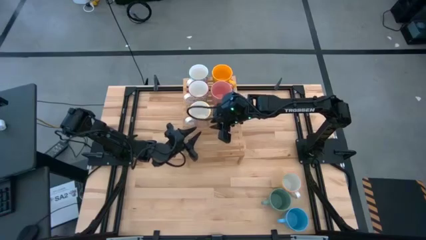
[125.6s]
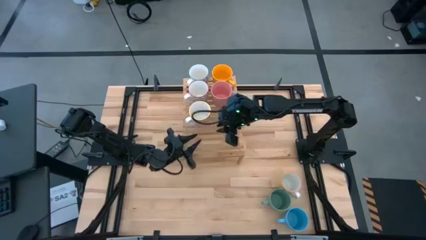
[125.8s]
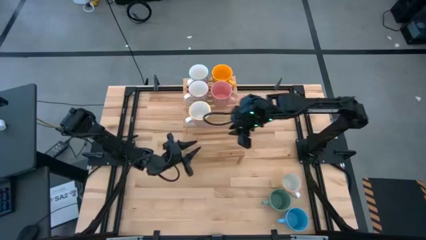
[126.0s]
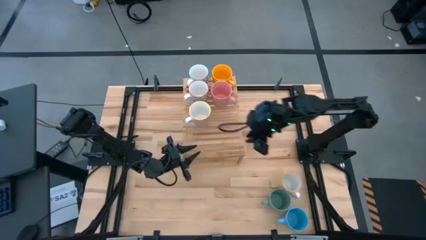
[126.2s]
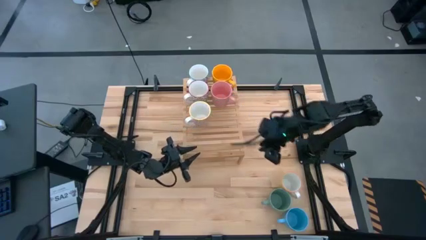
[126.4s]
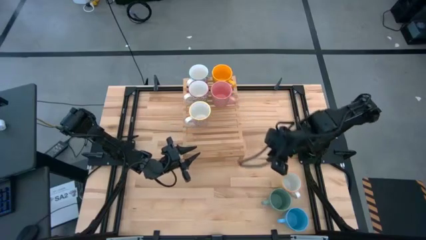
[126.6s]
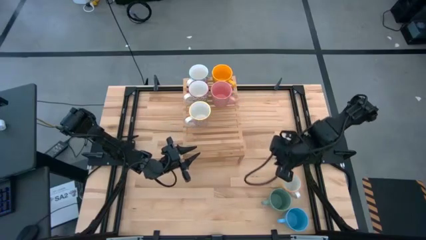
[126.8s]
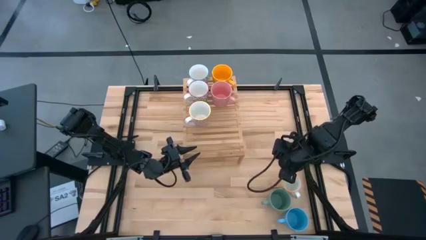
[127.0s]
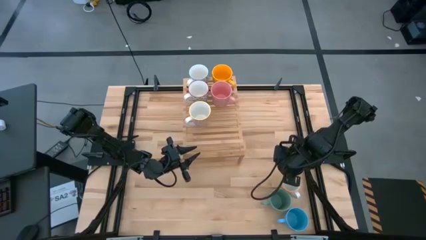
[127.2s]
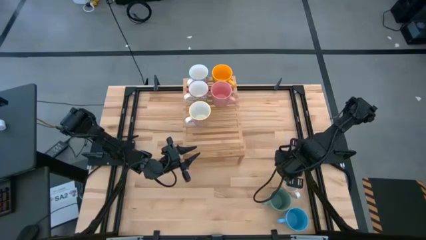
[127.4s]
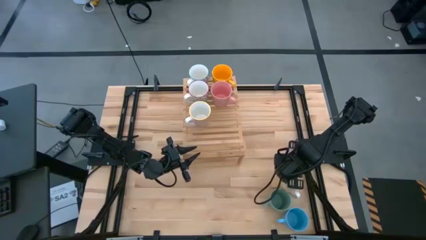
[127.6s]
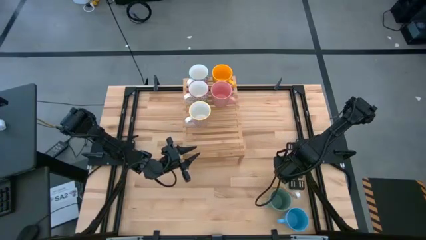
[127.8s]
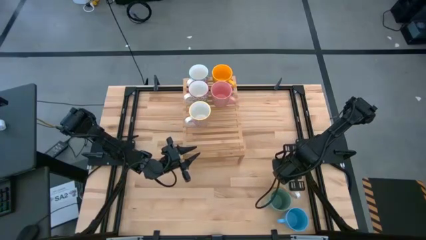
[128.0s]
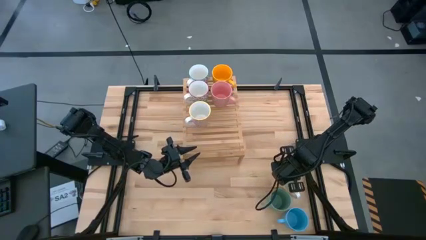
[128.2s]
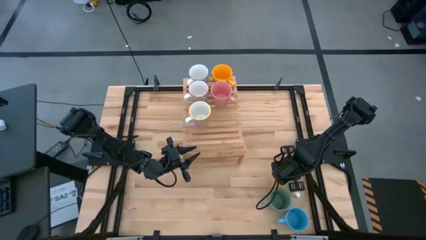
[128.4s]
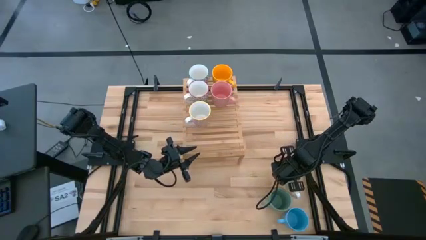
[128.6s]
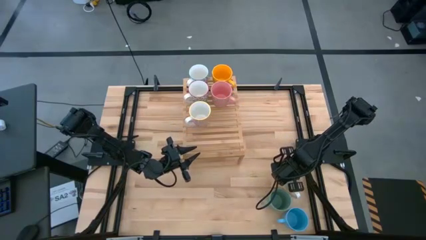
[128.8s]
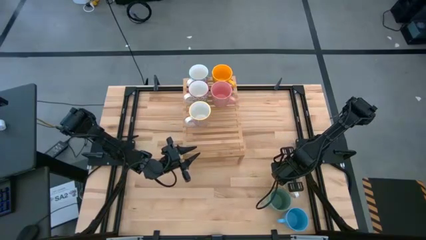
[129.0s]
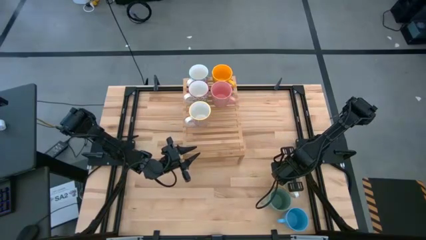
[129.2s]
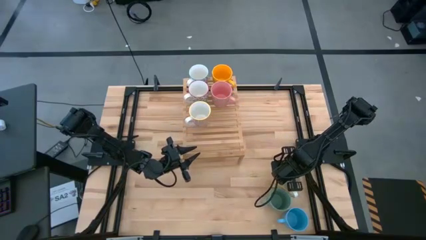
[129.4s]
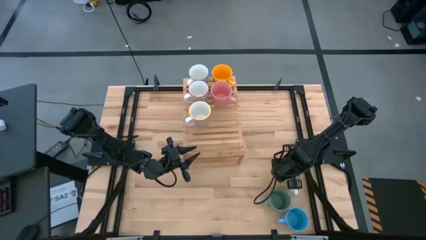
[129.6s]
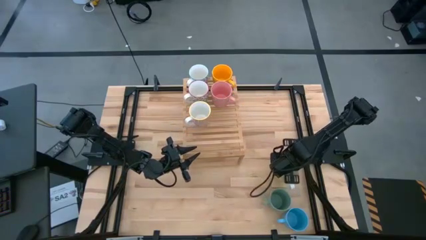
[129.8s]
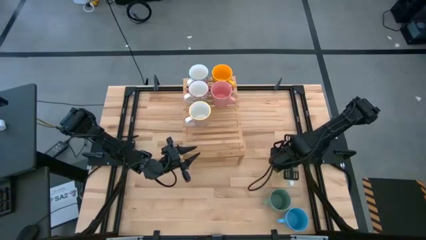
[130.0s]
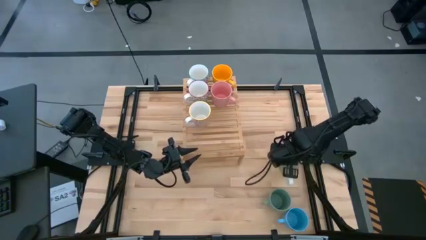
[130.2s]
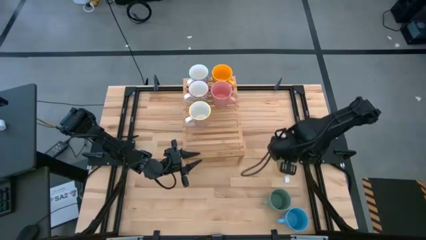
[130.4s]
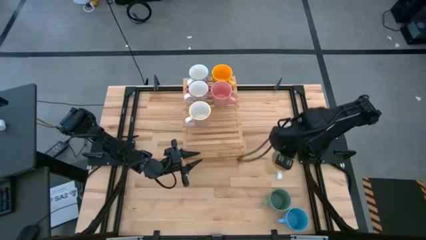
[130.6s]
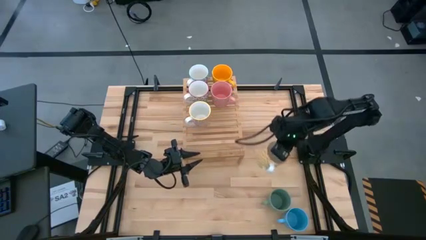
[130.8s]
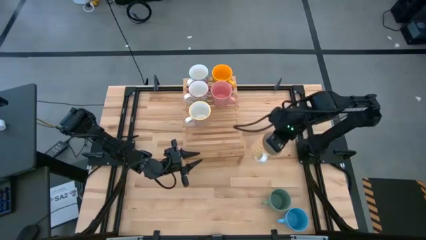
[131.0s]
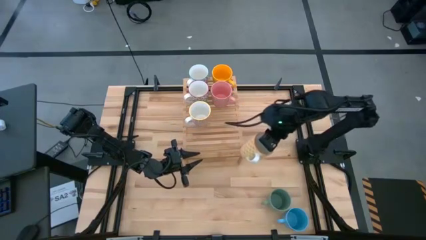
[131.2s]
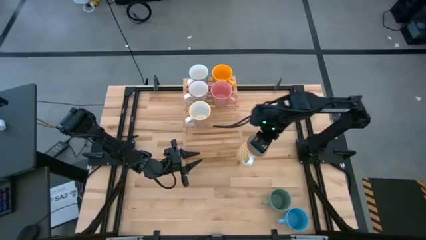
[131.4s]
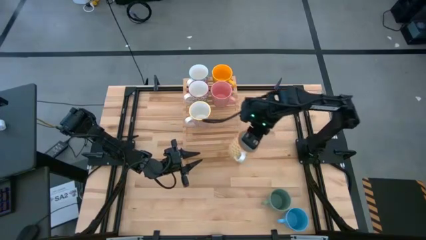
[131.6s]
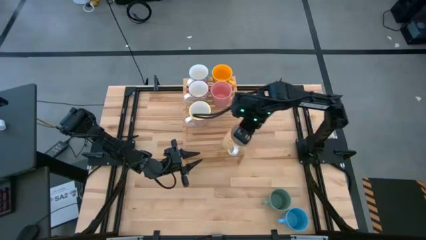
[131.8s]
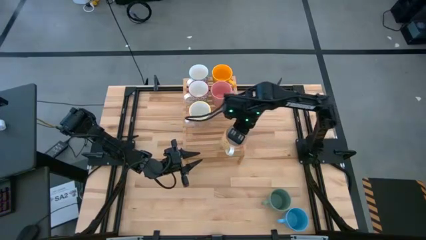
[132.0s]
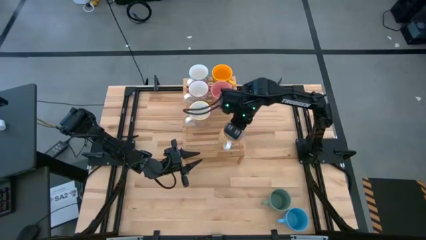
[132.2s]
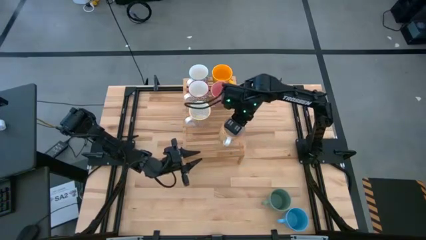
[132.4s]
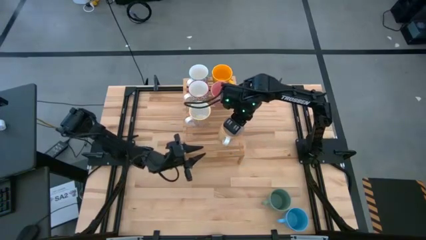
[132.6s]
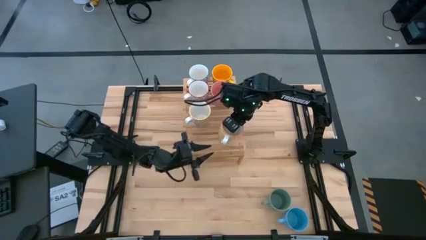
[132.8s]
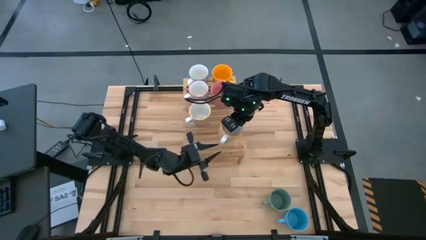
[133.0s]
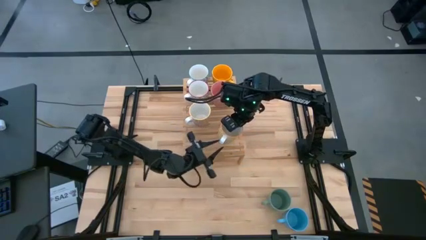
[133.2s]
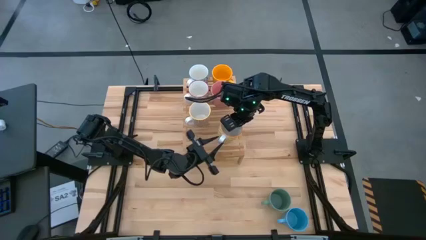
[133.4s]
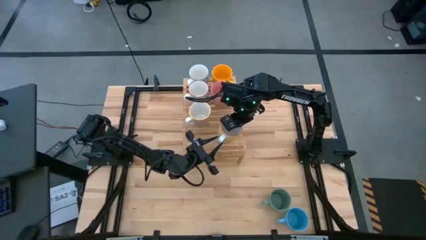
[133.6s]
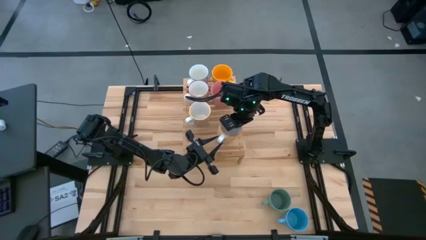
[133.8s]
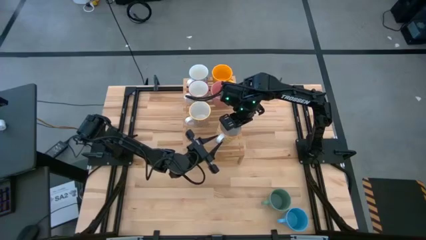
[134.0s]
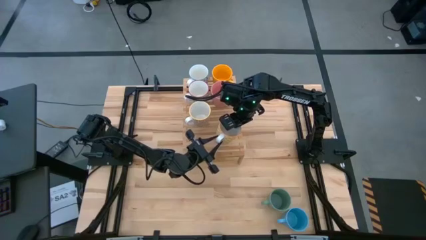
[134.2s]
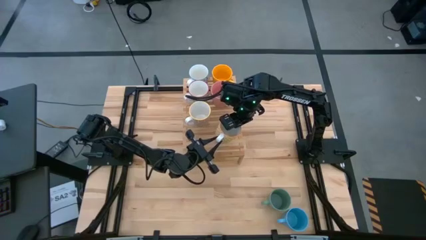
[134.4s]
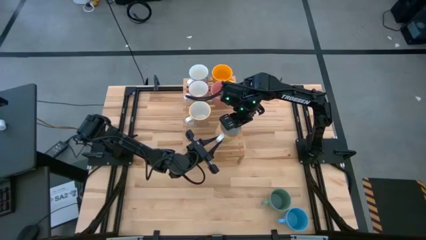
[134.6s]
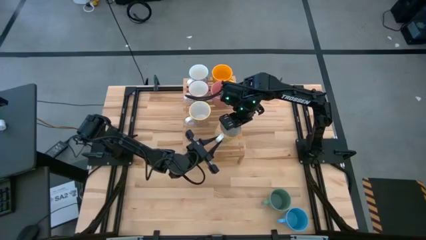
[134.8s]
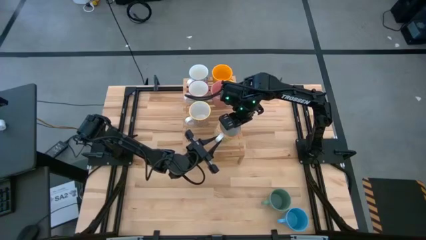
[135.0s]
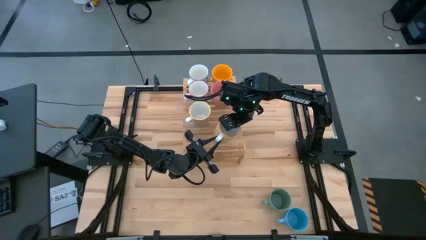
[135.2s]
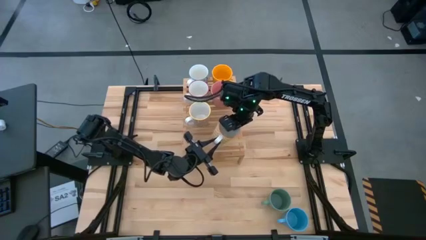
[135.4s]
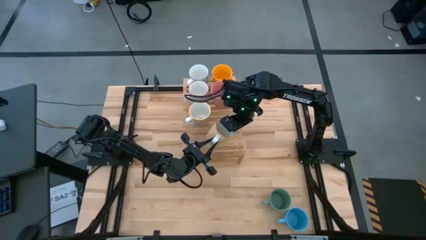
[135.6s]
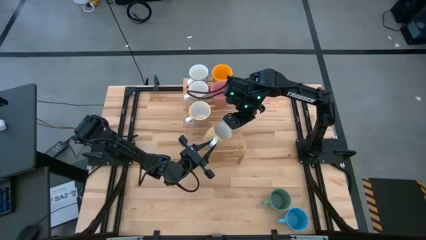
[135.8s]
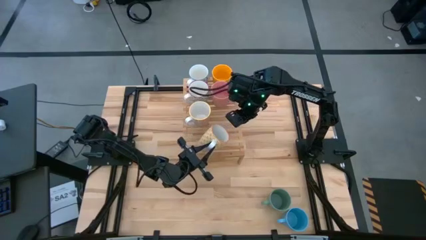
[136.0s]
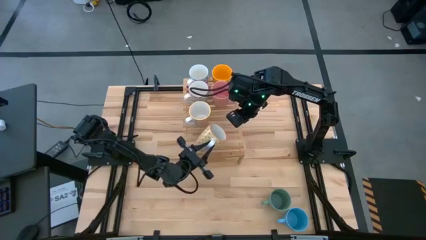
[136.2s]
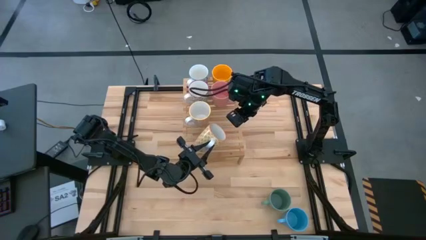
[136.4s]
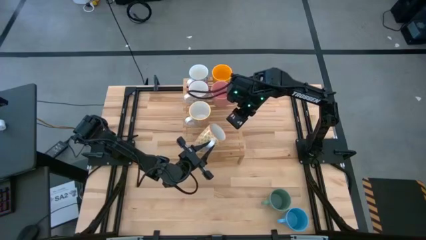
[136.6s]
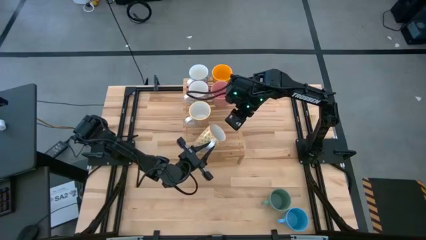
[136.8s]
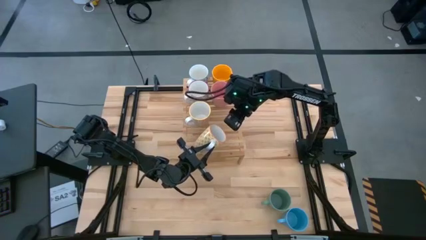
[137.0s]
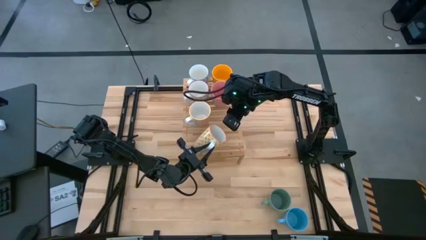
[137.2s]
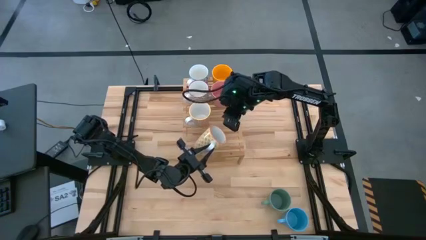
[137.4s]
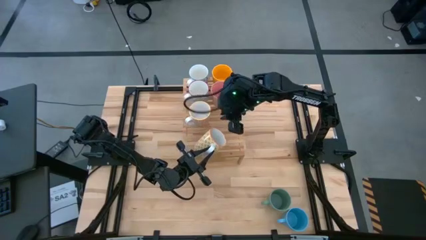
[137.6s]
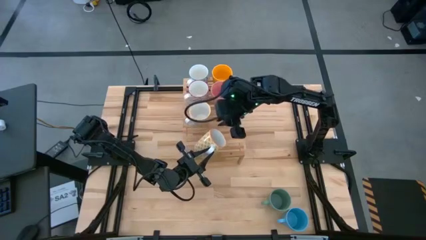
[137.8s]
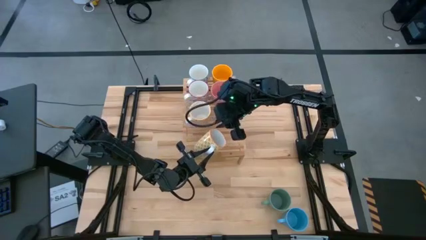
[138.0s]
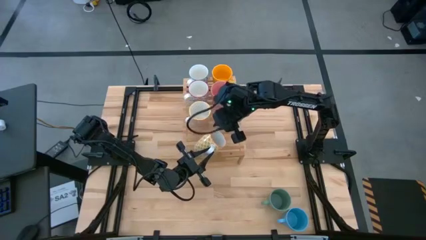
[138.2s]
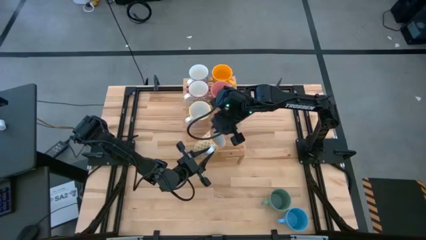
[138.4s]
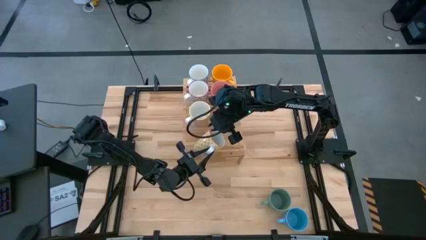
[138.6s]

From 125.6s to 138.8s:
Task: Place coffee mugs
Put the yellow cup on the shelf aligned with the other orange cup

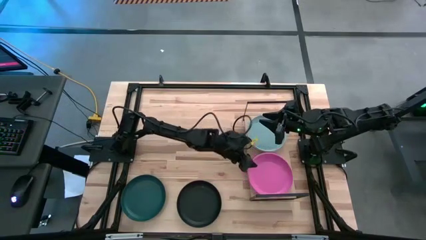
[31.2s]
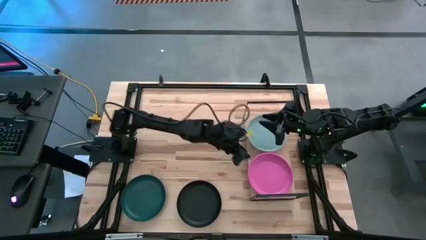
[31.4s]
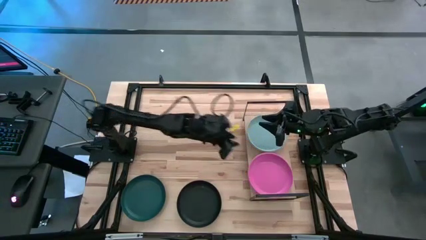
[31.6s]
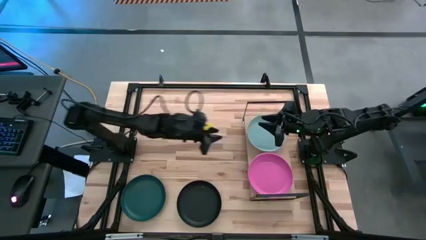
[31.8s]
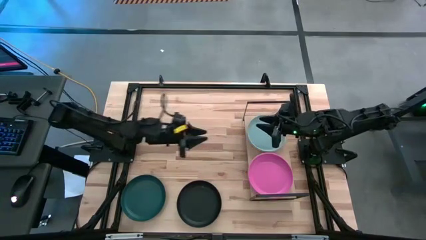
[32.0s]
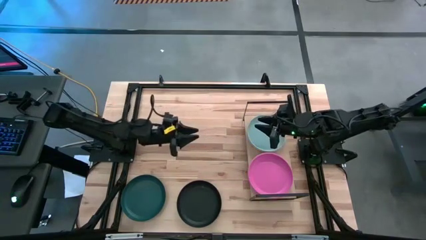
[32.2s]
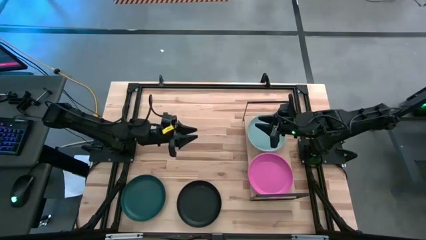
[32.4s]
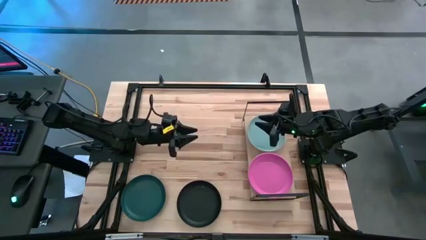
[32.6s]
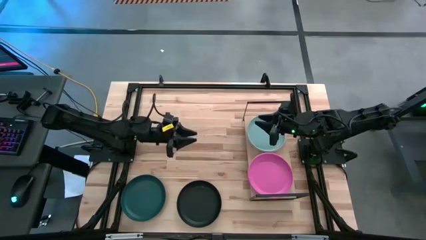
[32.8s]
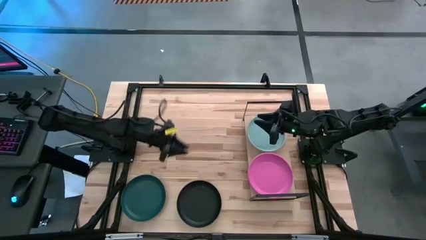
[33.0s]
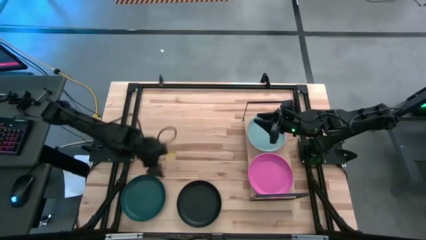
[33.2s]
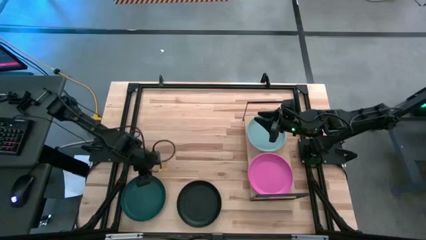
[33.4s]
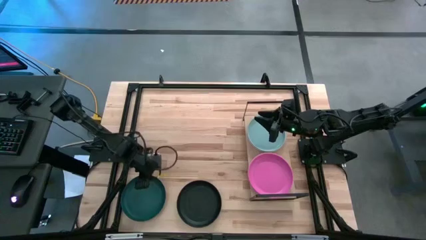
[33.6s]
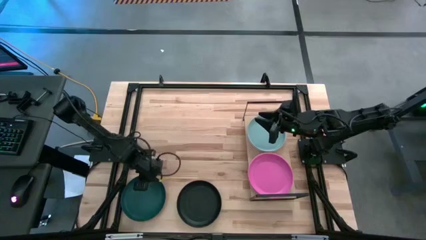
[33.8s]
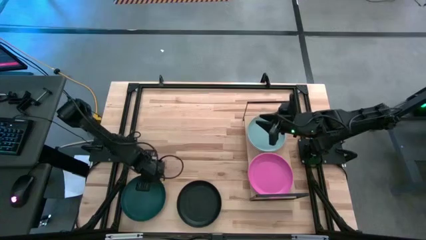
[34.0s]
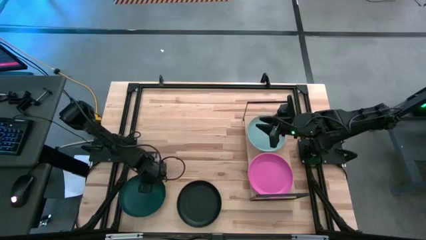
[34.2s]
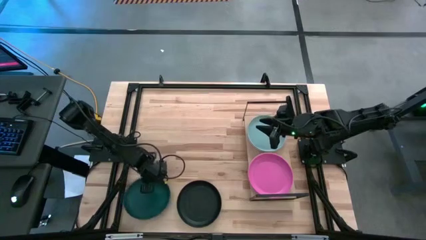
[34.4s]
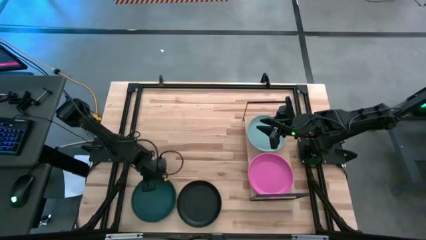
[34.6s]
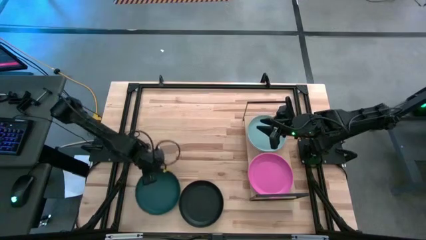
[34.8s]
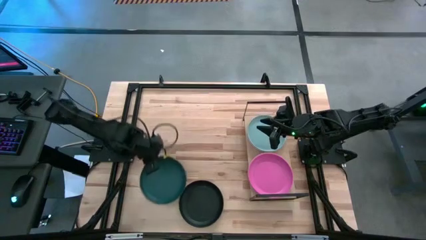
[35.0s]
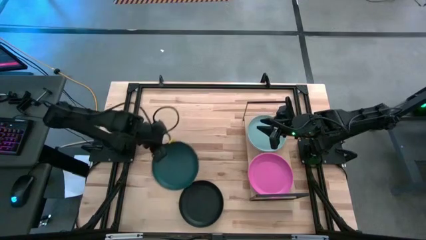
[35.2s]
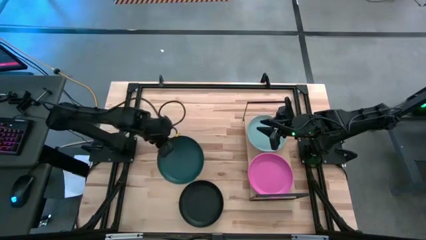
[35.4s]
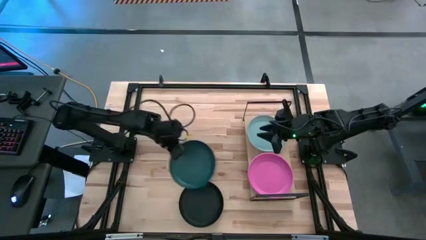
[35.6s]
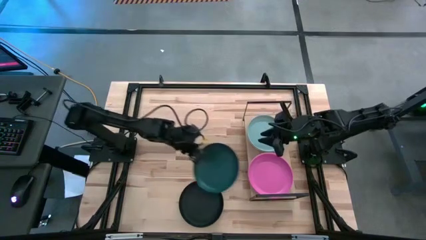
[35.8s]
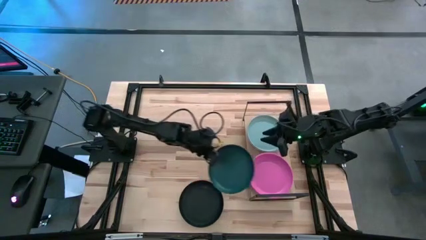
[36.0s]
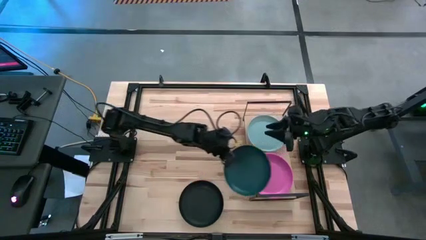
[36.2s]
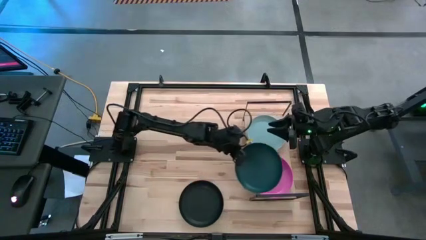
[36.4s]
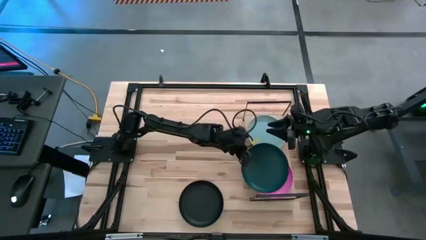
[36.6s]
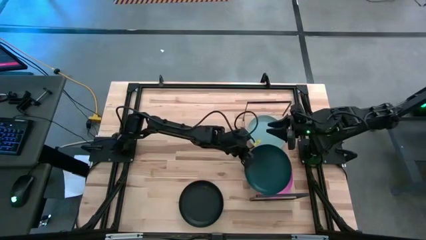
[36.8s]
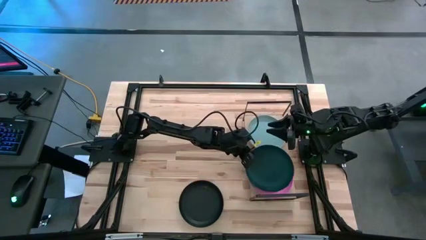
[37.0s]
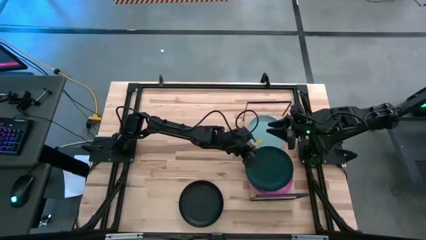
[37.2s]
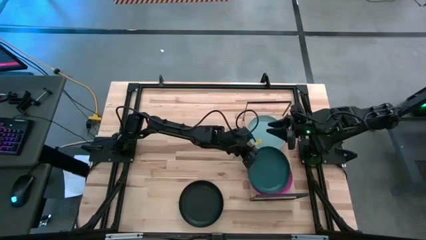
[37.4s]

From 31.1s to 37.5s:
Task: Place and stack plates onto a shelf
Stack the dark green plate on top of the dark pink plate on the shelf
